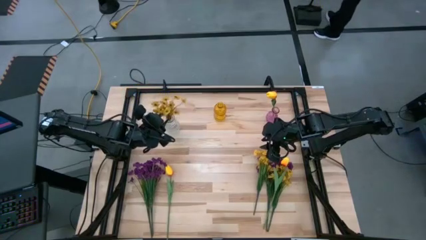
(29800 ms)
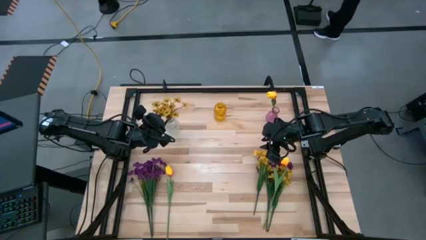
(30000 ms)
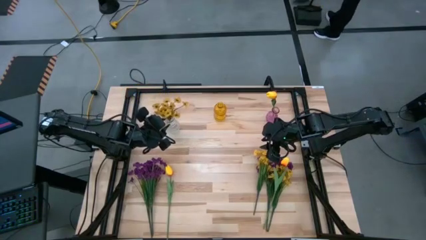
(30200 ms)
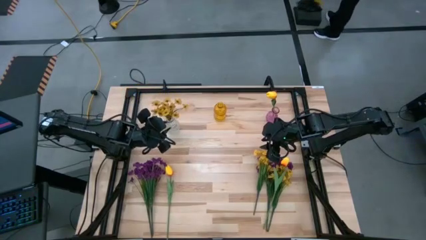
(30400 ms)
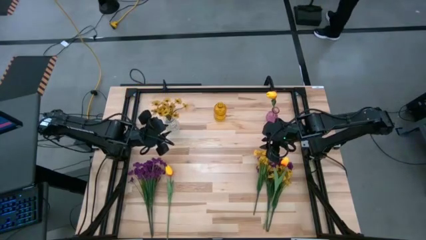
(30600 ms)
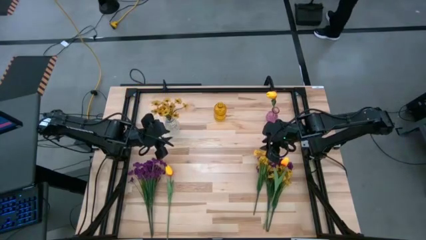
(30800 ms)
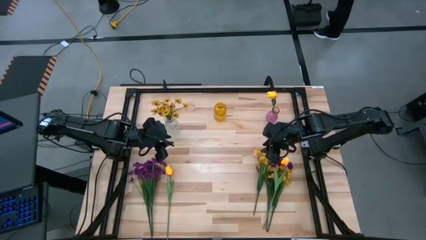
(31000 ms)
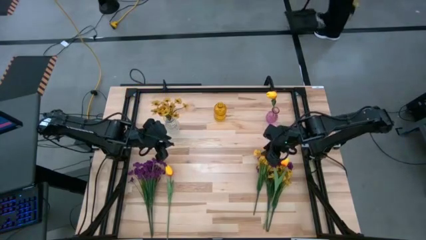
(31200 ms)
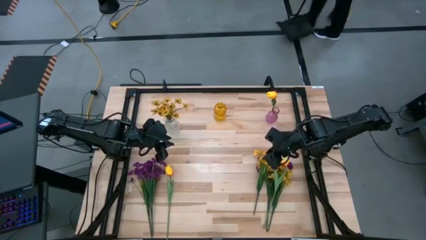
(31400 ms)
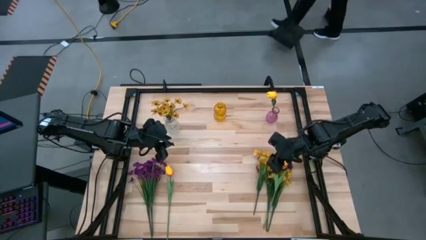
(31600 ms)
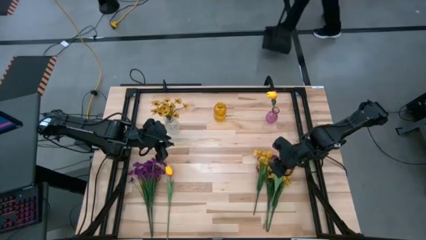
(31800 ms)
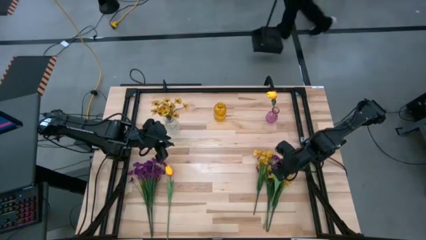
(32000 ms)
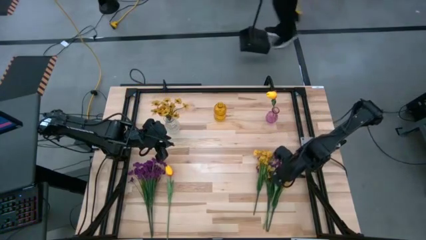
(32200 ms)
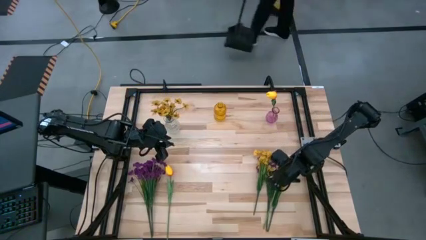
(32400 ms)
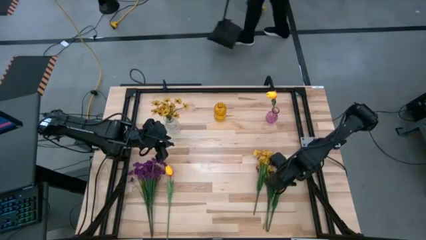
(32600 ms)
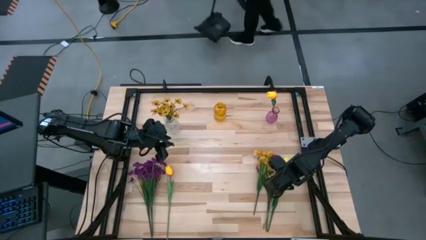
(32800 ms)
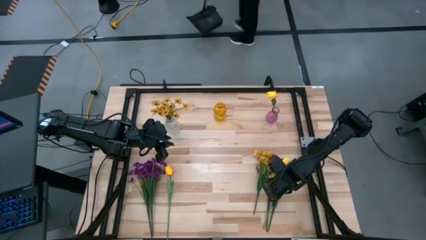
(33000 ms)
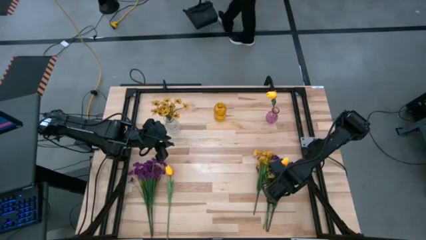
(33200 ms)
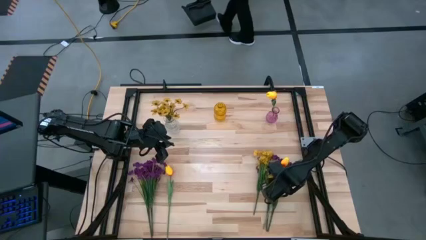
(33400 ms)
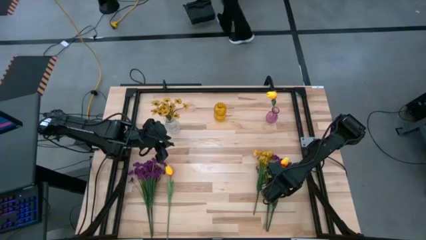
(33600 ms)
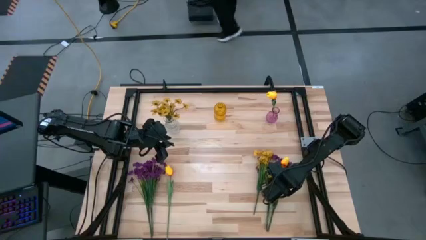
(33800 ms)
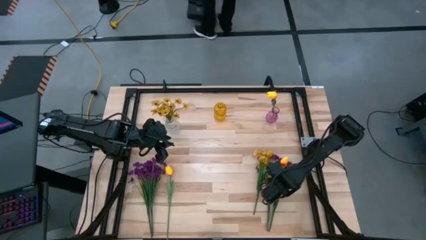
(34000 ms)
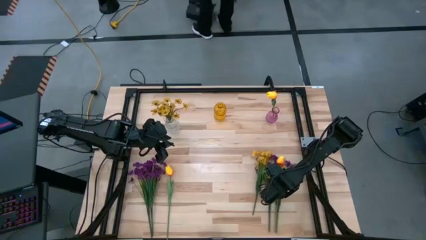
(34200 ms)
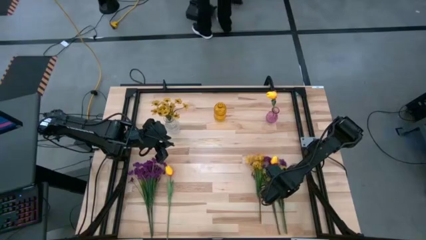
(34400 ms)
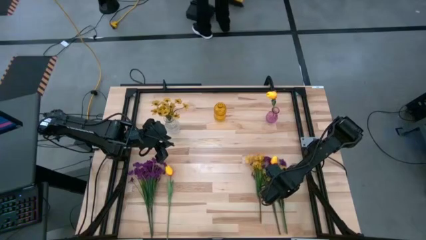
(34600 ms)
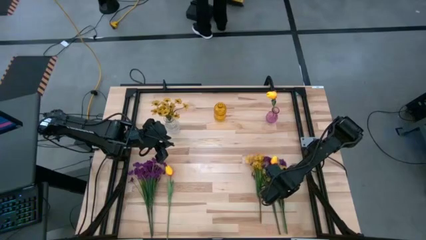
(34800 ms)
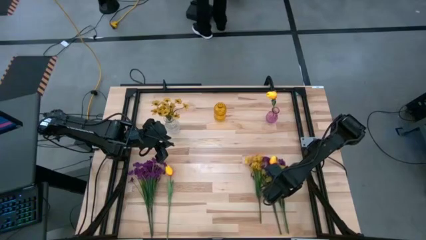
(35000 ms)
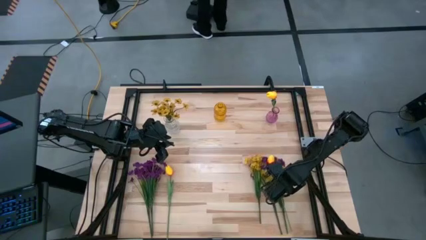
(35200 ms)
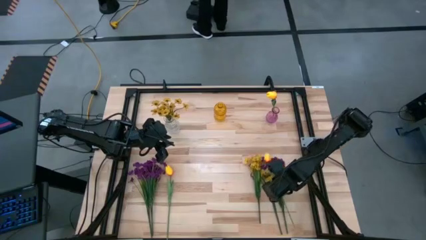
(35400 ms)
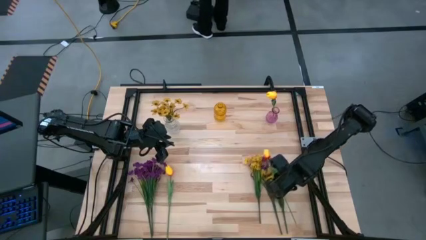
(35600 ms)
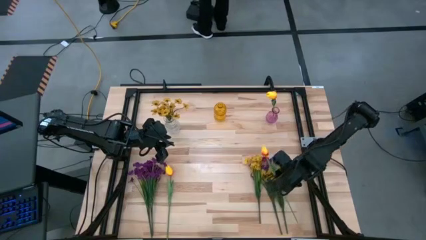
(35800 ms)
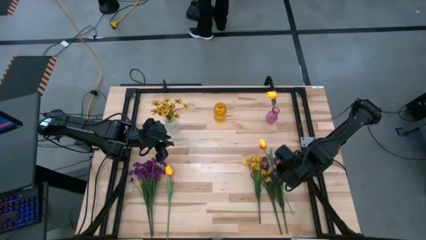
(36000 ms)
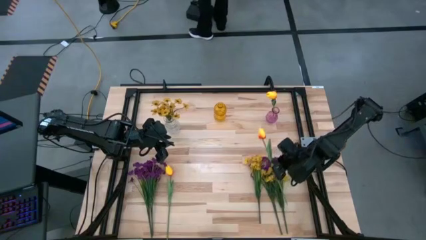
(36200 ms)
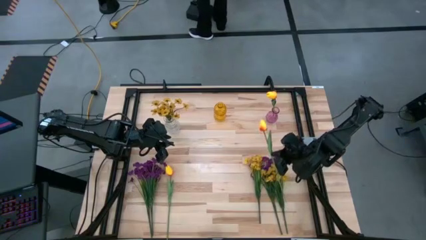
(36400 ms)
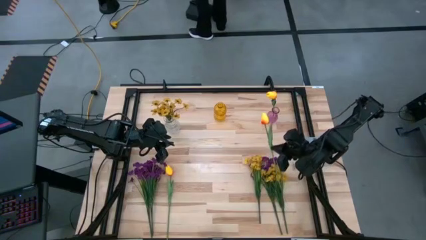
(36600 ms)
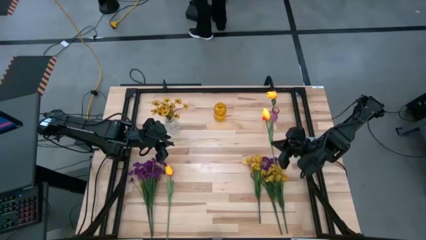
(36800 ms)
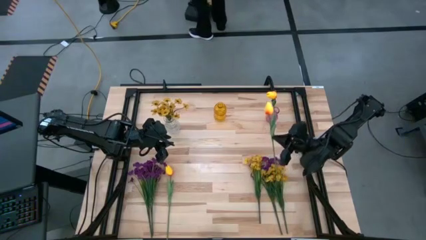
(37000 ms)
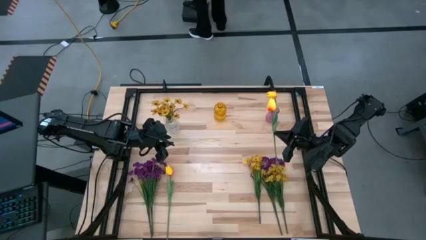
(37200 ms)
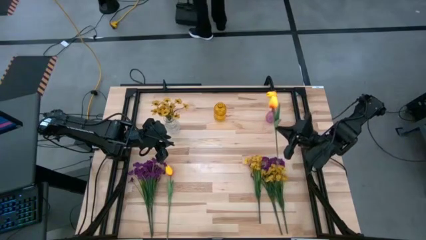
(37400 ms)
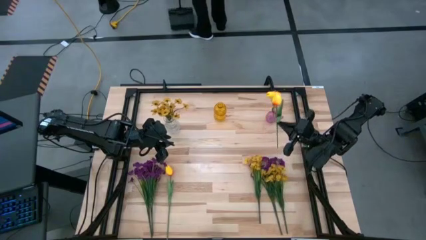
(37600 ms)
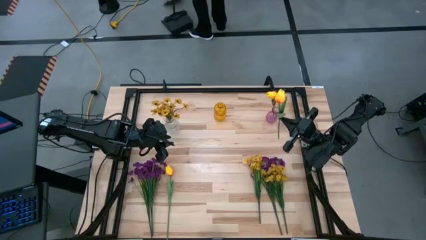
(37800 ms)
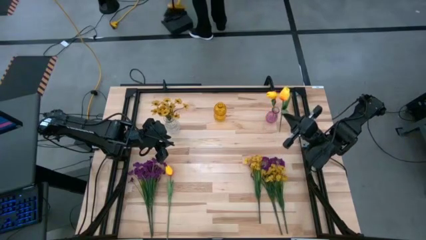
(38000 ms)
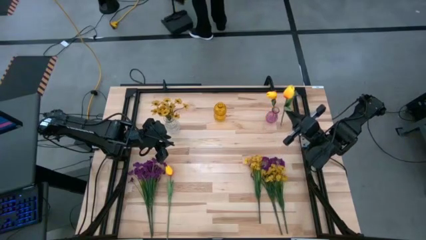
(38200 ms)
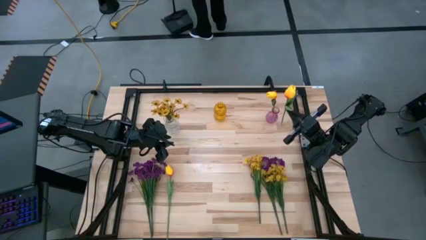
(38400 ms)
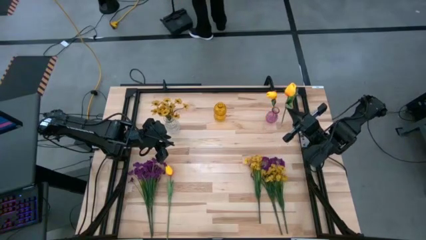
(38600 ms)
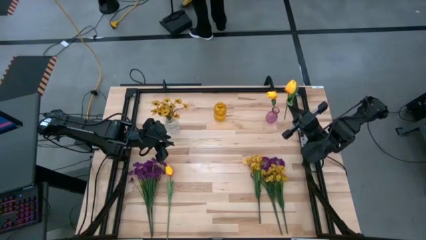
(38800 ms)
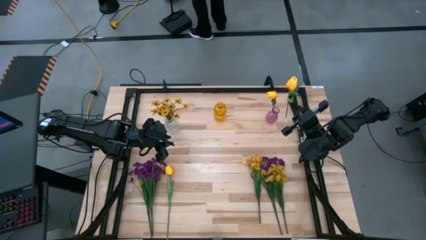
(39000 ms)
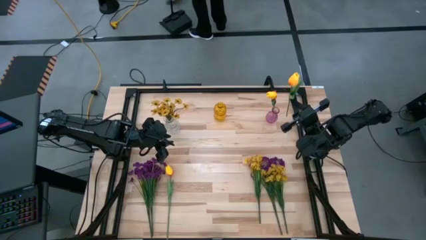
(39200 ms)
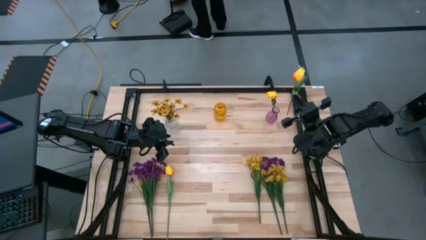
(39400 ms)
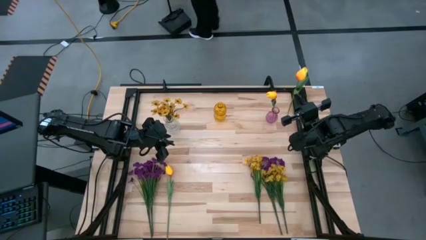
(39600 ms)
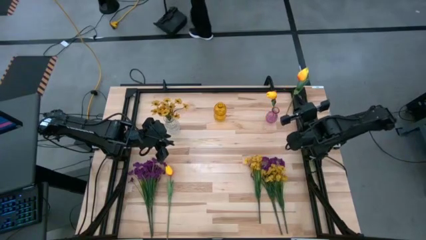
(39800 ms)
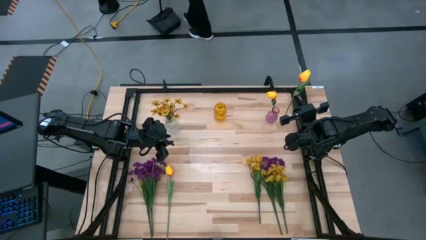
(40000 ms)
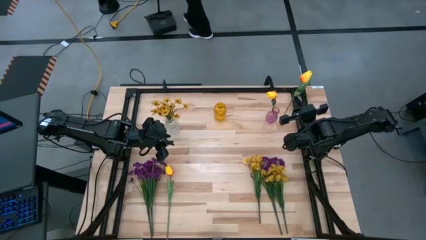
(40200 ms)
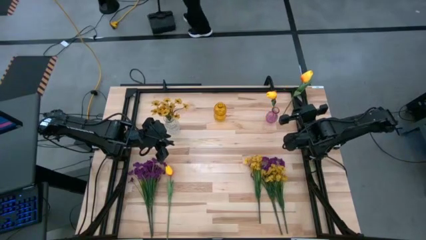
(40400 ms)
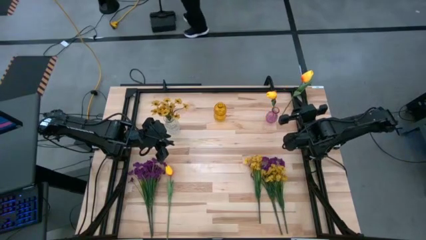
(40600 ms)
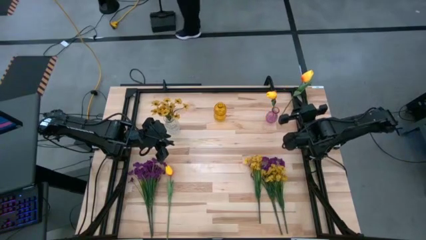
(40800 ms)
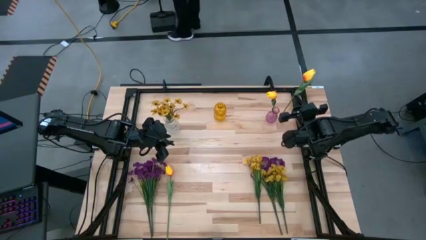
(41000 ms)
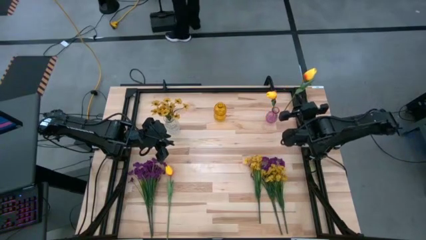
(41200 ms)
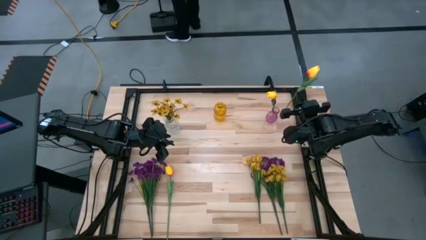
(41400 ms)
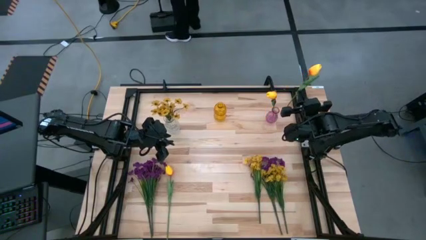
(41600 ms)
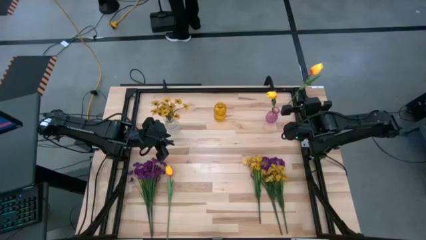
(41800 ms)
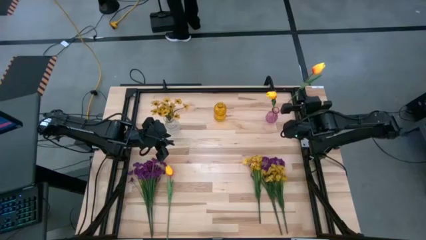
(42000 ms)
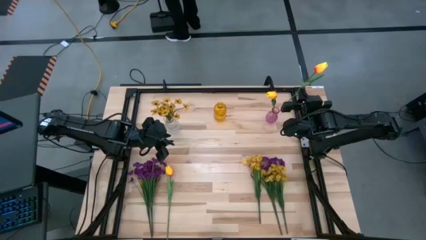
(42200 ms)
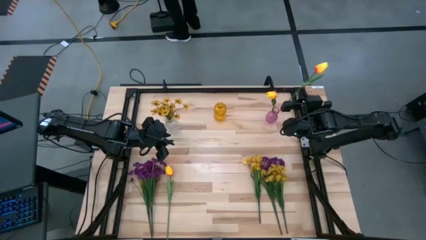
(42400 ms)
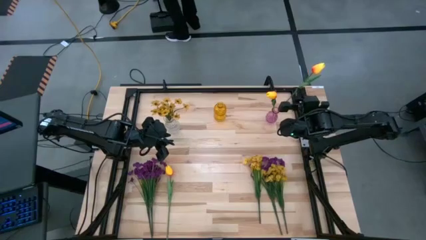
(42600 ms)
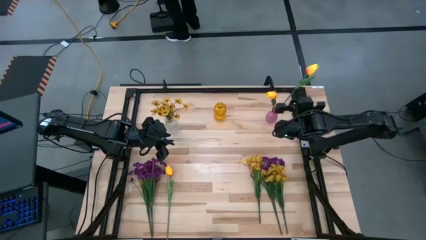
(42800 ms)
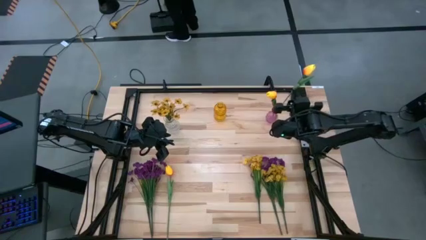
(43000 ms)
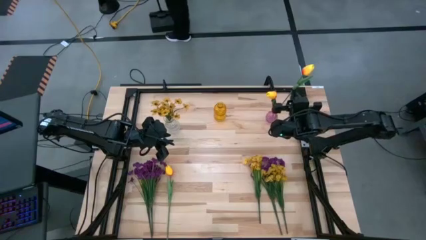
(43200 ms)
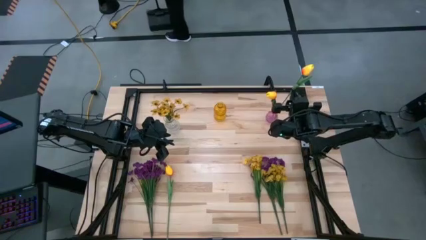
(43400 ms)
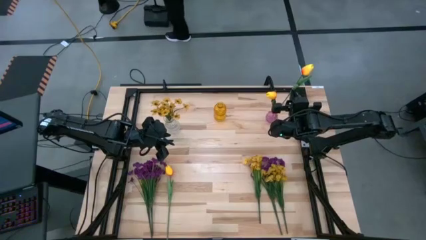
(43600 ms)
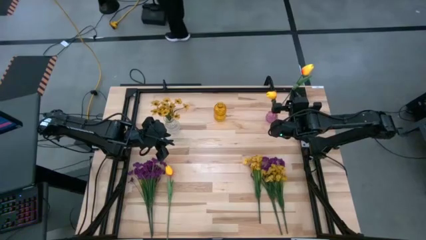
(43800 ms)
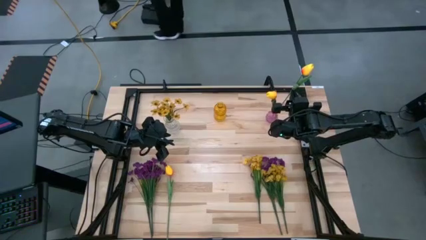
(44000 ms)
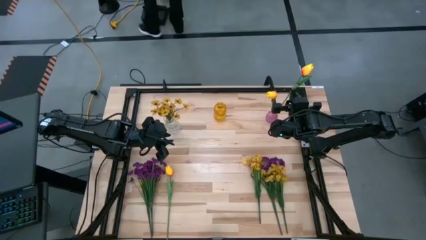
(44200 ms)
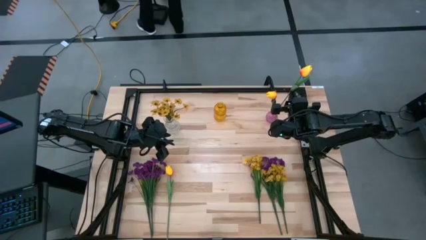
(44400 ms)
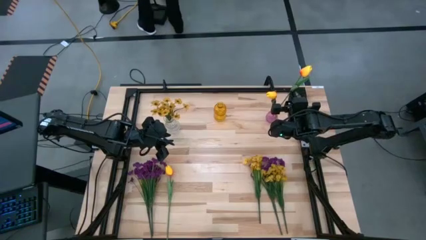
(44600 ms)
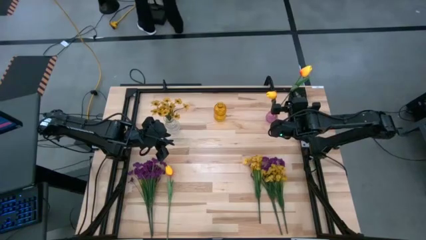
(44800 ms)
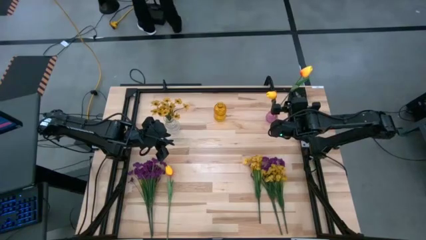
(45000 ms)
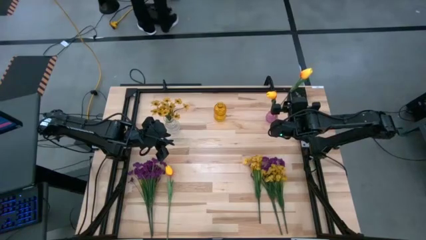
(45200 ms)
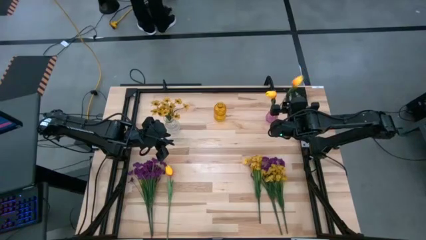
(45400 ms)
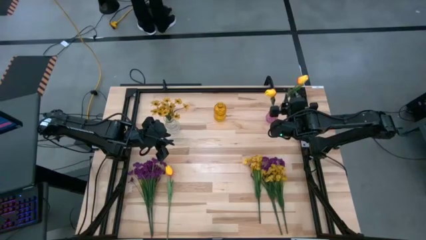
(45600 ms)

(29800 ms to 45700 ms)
Task: Sort flowers into vase by color
Put the right orange flower into the purple vase
